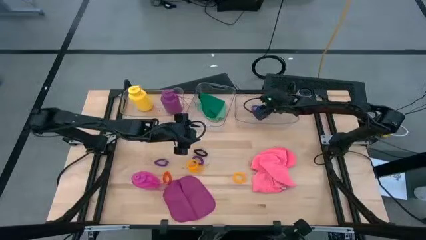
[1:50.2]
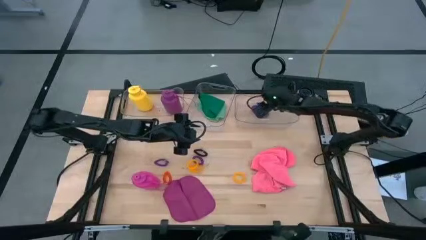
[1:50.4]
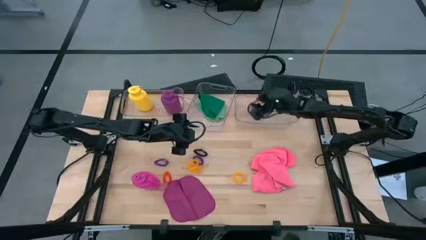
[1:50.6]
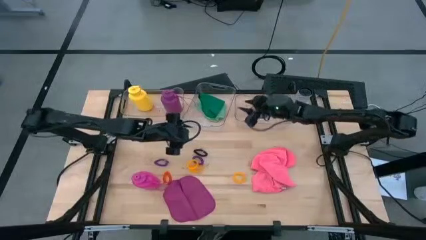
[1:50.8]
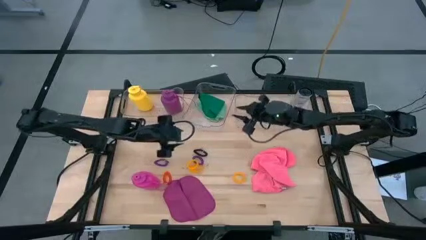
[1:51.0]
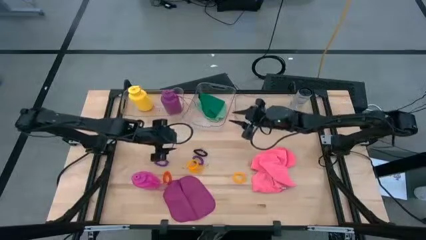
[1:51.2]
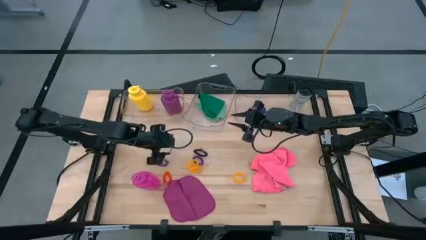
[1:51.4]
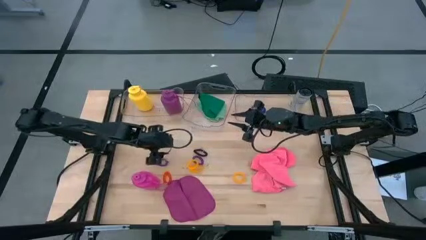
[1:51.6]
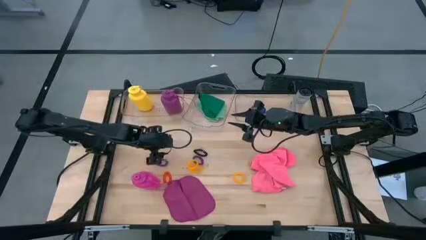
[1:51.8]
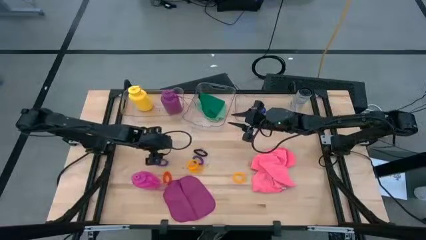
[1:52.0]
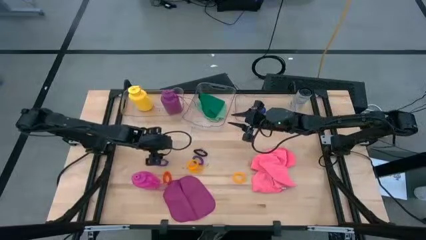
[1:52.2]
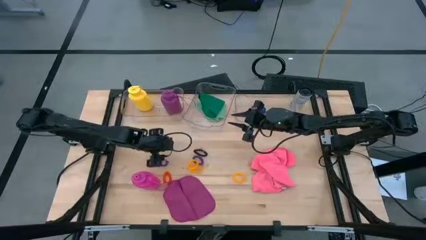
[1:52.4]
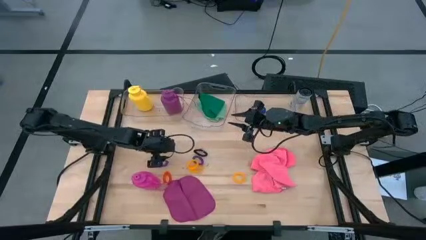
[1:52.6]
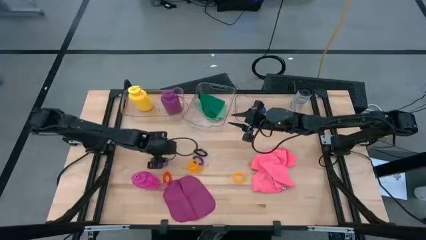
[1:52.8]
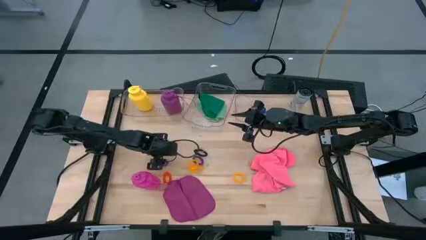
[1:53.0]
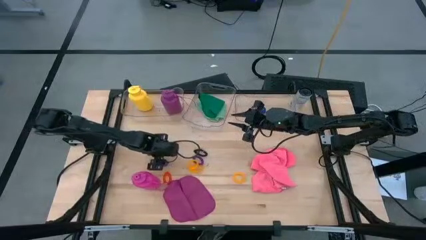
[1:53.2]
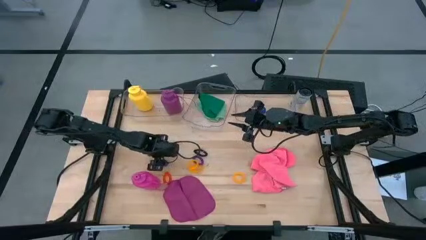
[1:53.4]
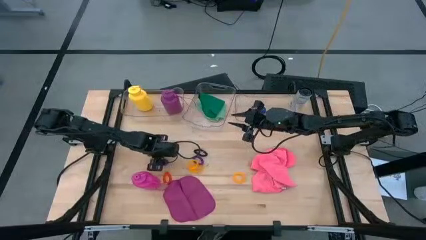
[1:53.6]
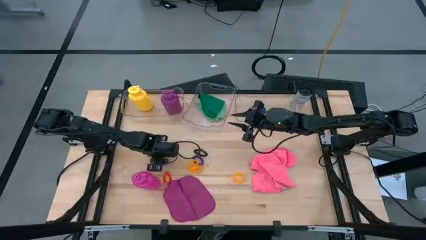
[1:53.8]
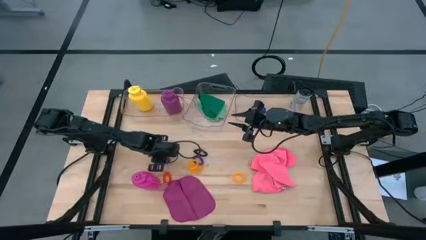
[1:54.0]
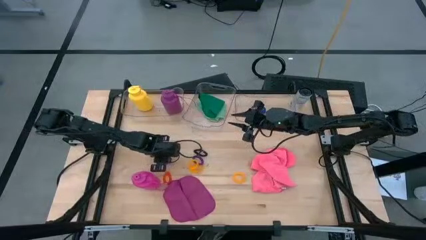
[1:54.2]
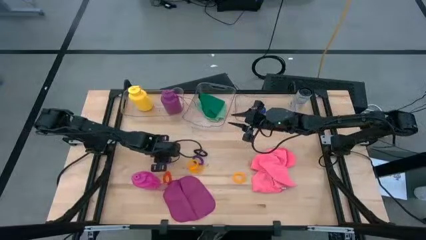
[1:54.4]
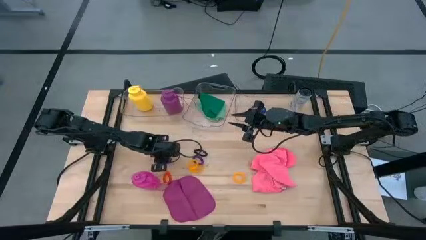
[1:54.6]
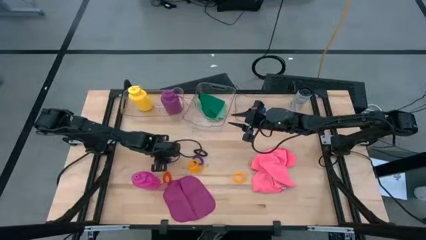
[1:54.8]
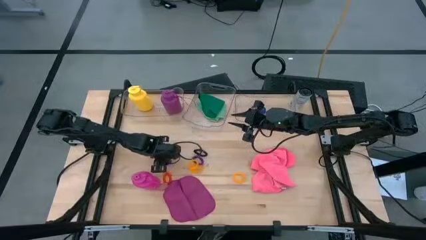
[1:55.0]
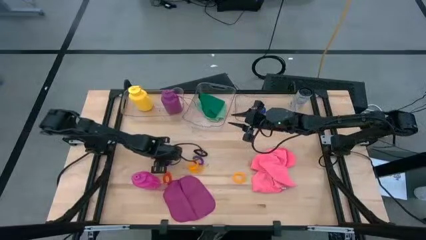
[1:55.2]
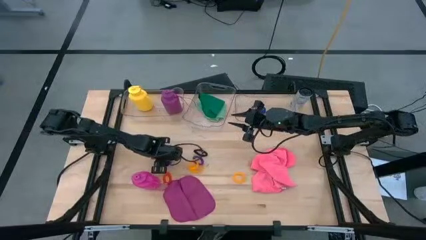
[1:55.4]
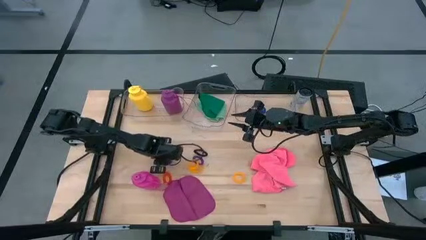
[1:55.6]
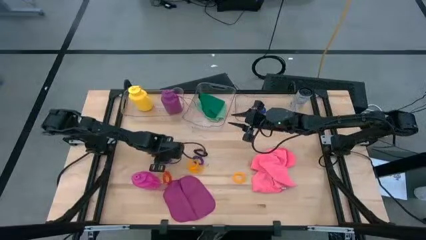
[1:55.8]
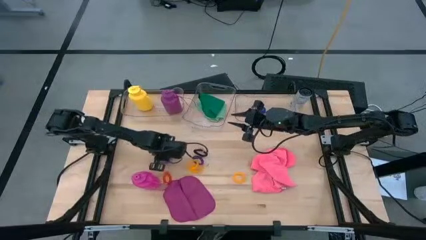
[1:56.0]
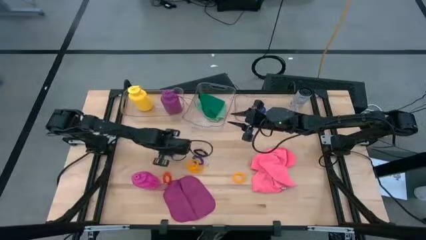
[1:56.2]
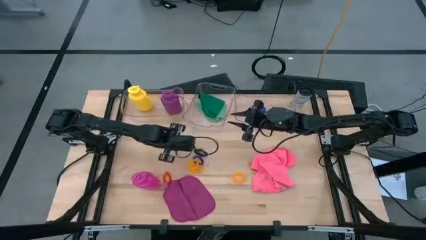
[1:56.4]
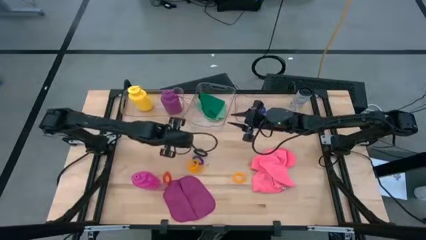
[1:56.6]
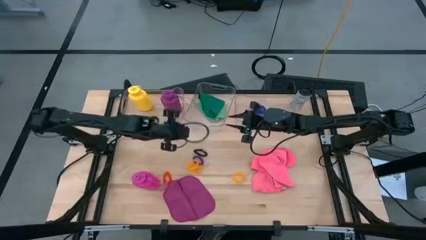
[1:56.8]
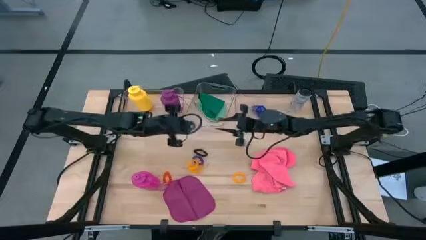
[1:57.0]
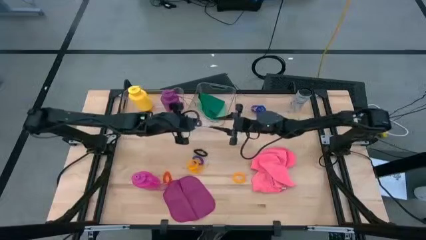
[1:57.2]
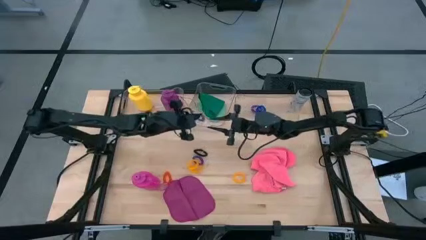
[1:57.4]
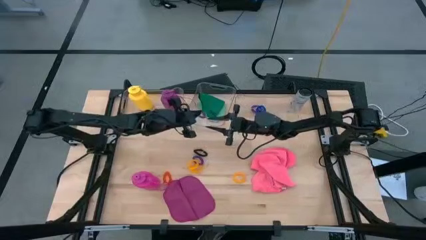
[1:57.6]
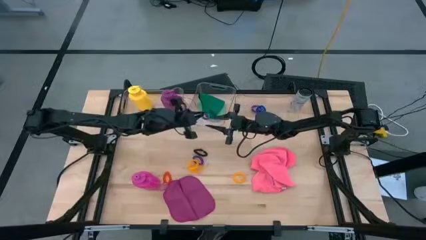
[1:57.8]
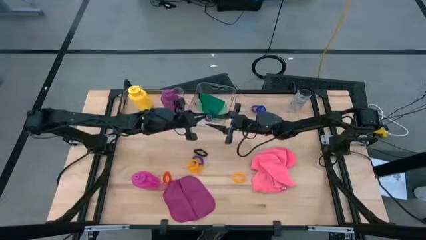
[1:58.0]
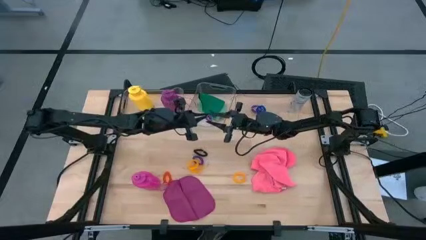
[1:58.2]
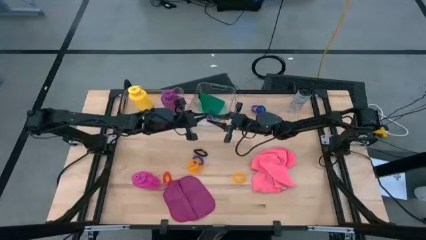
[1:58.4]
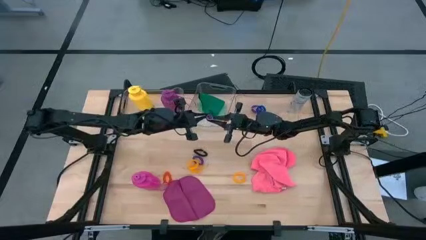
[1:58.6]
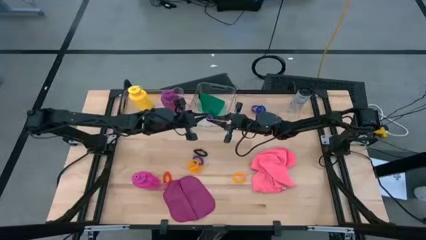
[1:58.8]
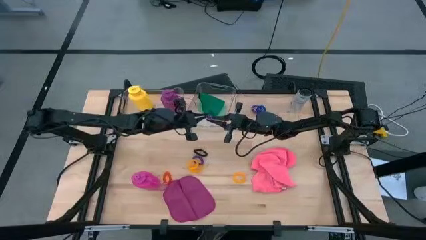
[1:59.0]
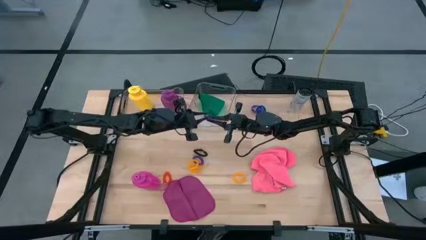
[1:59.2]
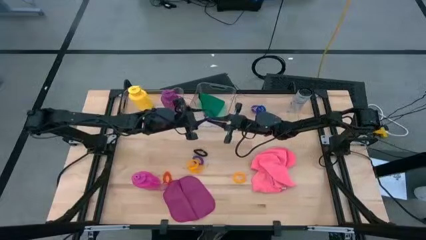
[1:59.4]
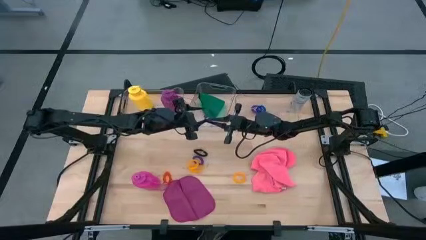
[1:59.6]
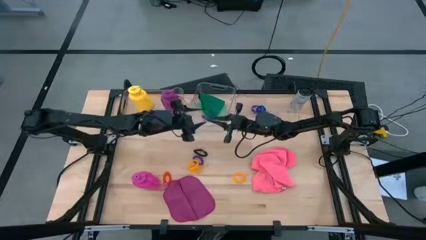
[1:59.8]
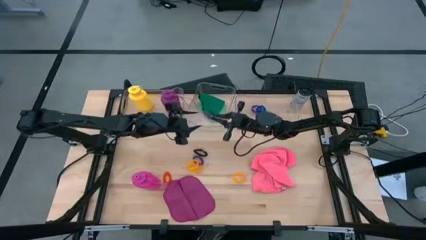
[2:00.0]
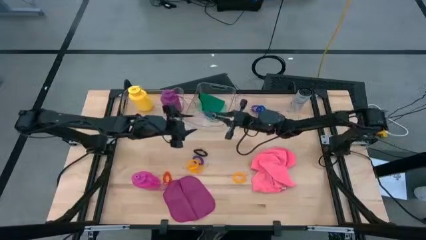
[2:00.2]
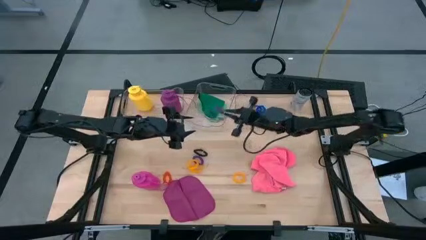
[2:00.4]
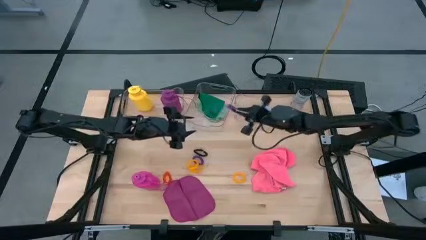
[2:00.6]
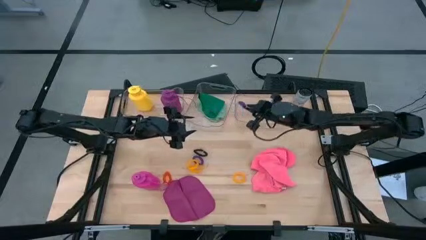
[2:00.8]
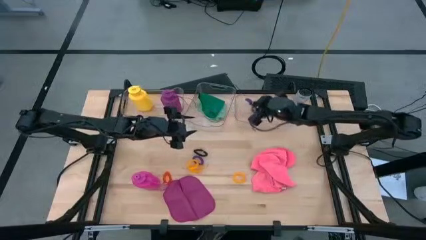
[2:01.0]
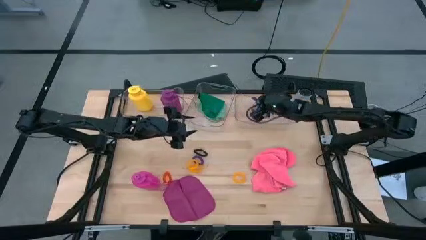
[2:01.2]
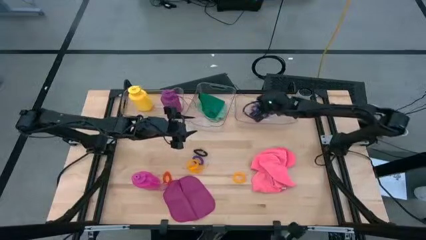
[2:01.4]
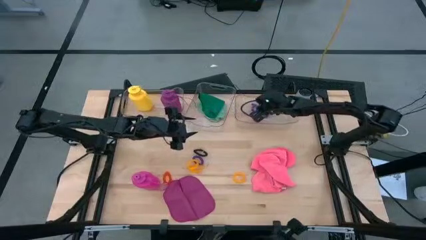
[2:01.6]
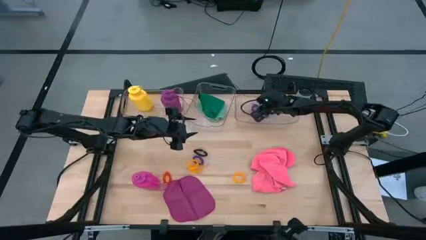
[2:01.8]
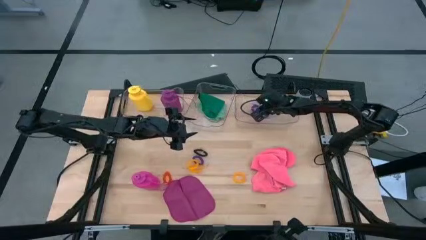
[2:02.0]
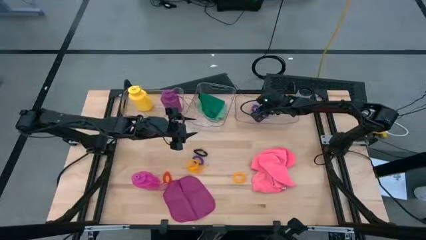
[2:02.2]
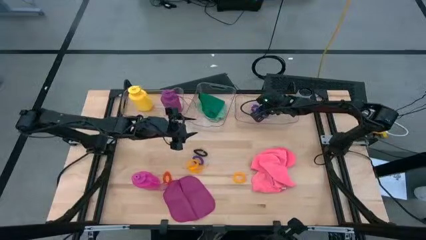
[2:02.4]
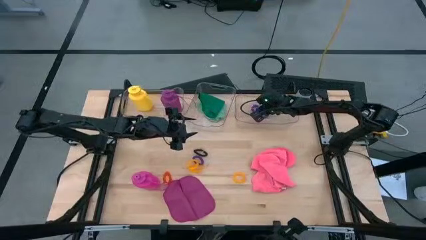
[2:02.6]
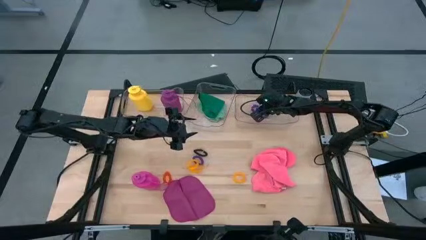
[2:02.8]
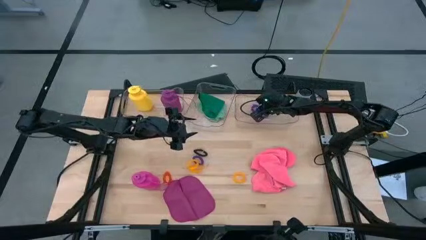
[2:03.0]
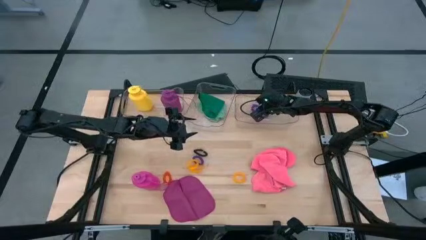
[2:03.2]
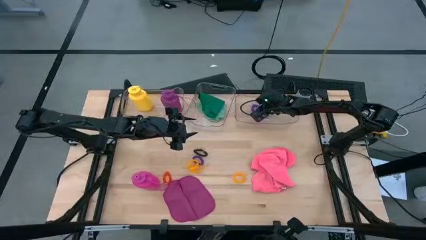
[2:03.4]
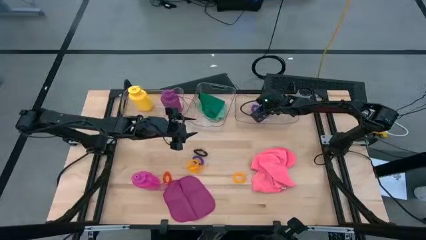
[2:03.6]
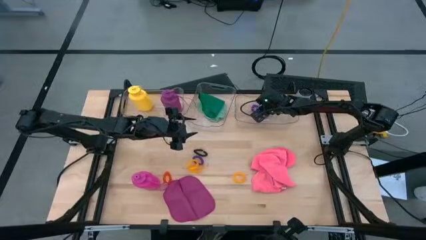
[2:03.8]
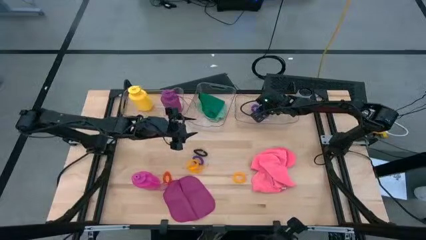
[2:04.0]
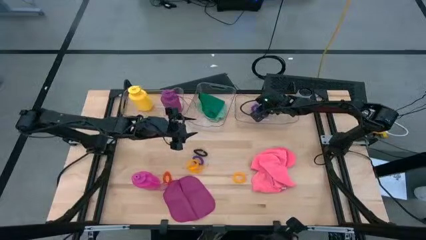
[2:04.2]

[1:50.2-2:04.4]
Task: Pick & Place Sports Items
Put the purple spring keychain into the right transparent bin

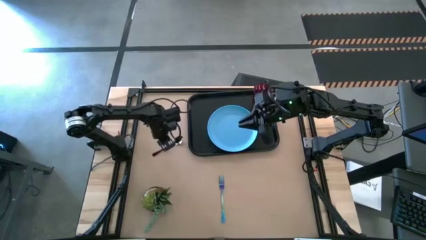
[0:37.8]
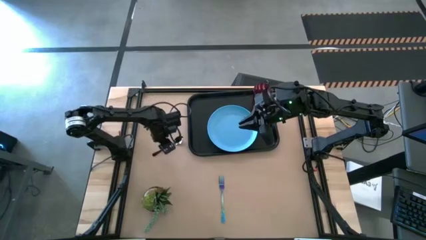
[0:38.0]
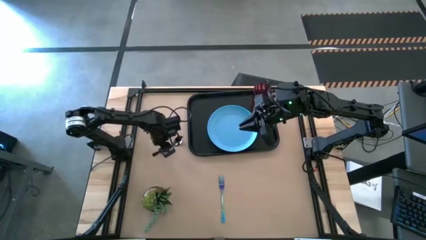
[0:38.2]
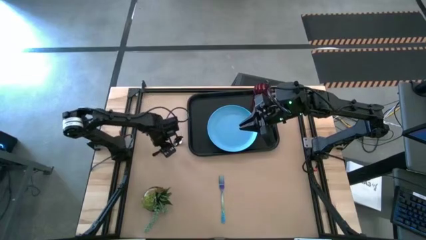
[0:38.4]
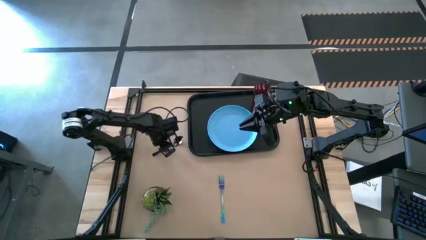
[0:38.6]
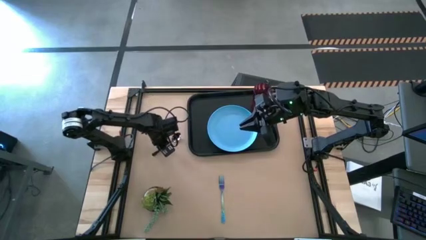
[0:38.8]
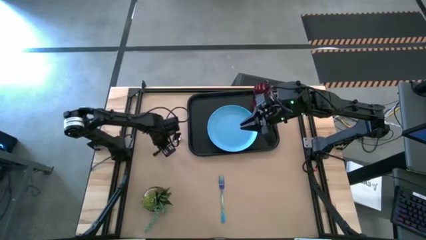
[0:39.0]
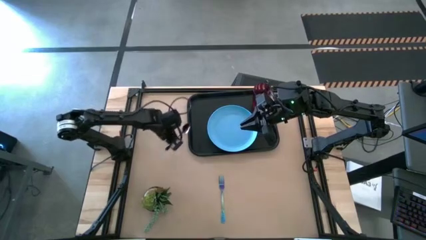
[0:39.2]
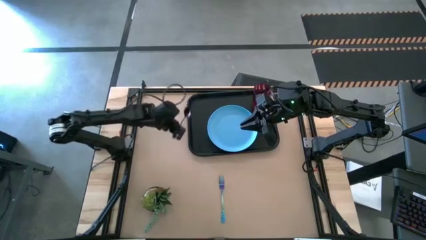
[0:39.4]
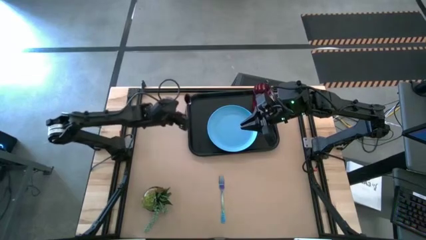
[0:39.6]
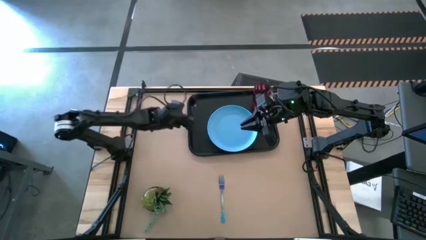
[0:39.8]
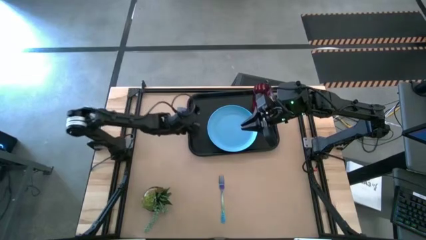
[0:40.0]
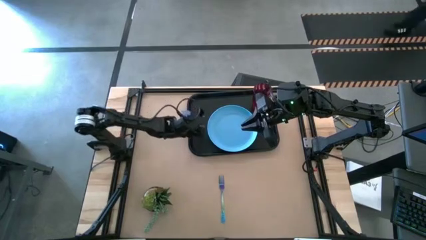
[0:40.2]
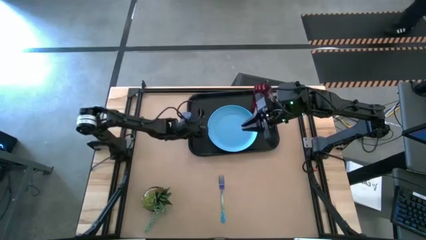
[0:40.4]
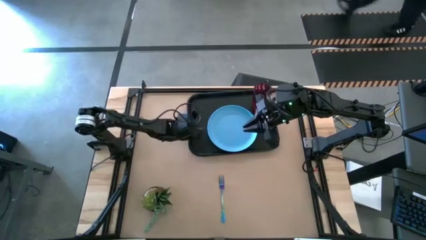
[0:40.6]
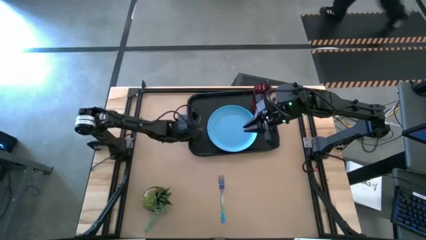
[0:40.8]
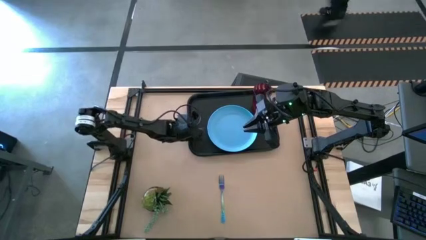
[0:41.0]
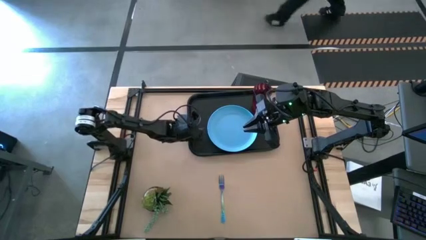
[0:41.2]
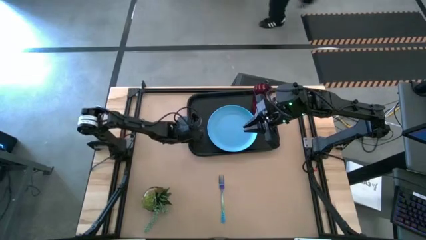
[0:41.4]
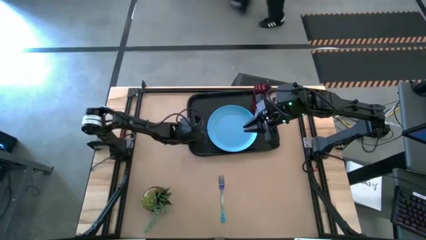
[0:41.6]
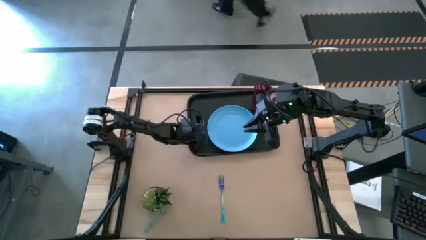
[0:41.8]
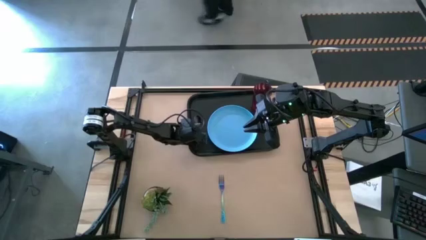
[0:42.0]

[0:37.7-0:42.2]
Task: Pick and place plate/cup/fork/spoon on tray
Put the black spoon on the left side of the blue plate on the black tray
